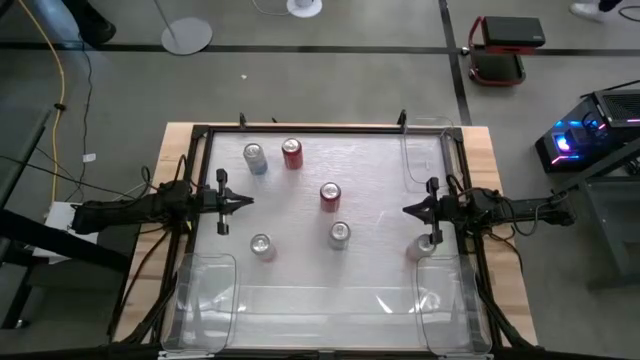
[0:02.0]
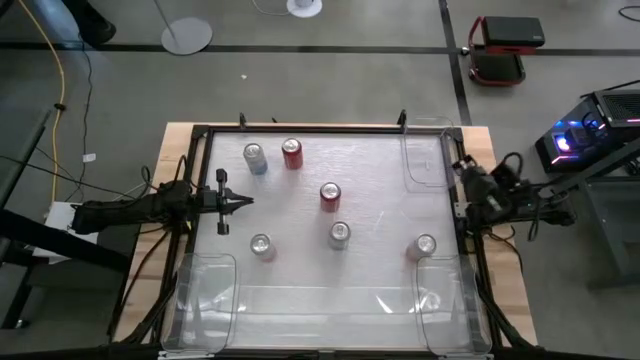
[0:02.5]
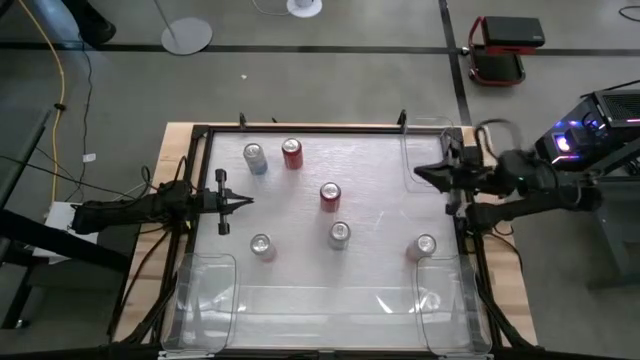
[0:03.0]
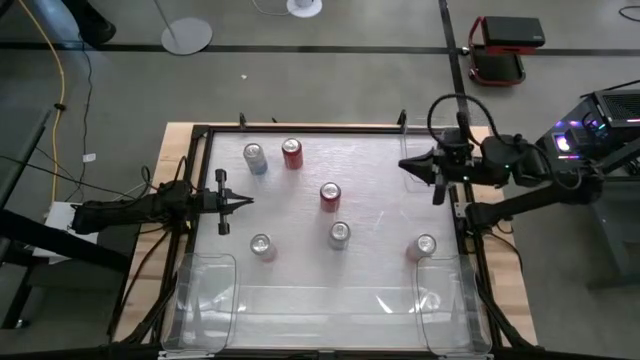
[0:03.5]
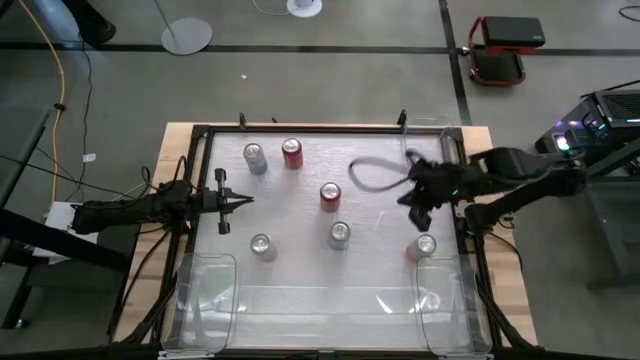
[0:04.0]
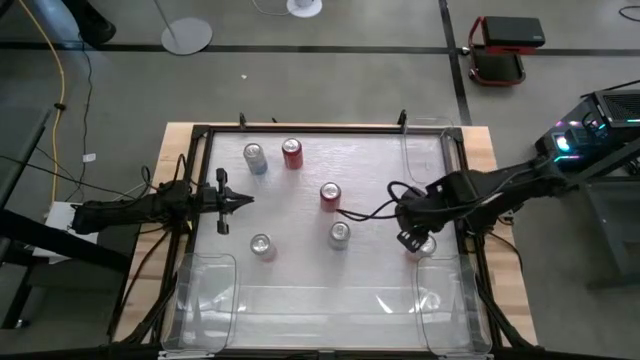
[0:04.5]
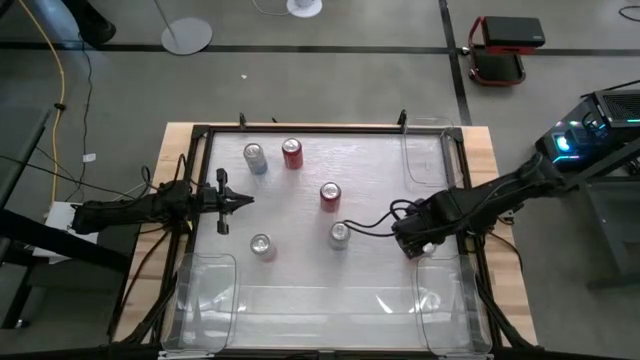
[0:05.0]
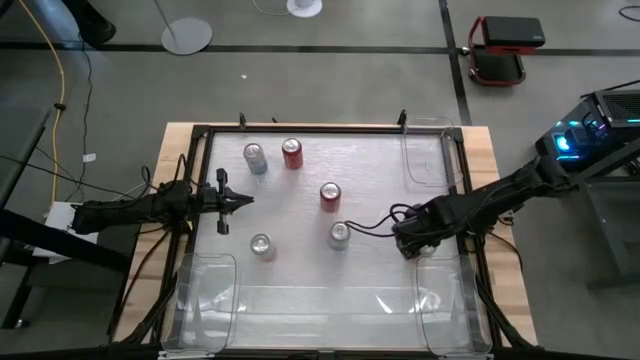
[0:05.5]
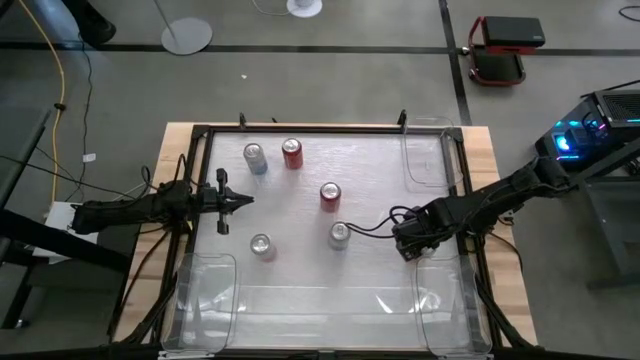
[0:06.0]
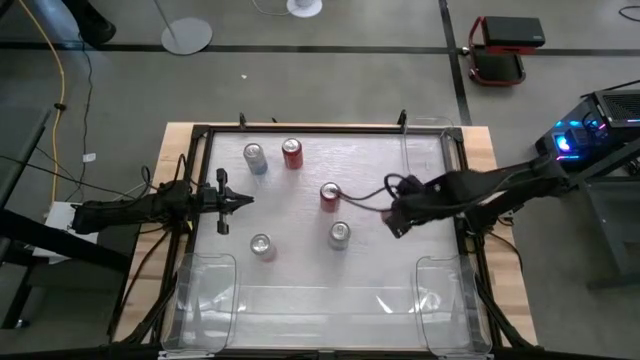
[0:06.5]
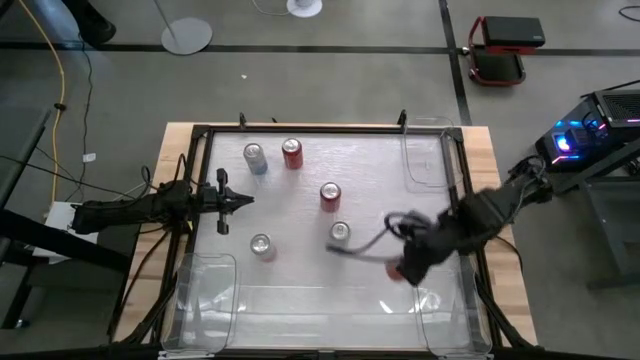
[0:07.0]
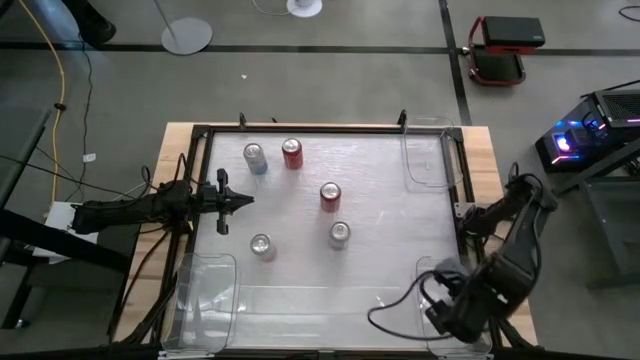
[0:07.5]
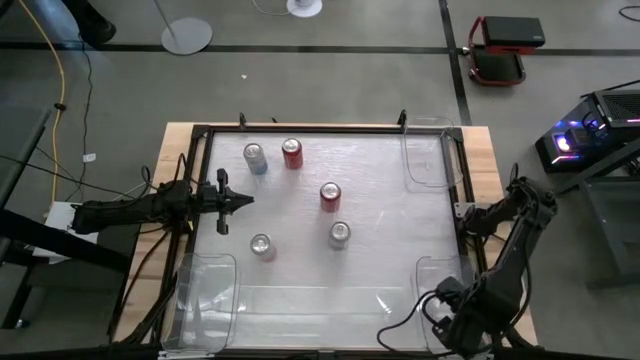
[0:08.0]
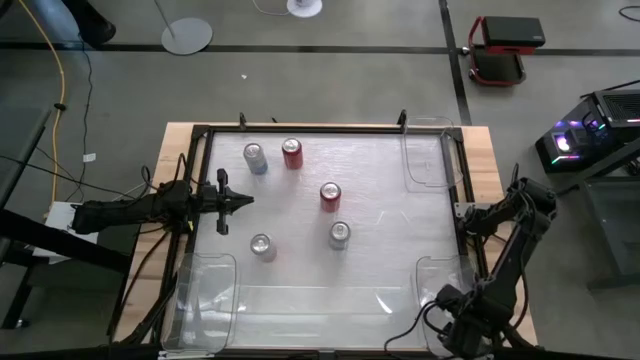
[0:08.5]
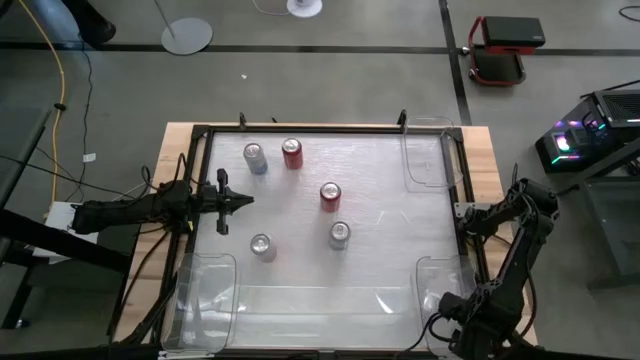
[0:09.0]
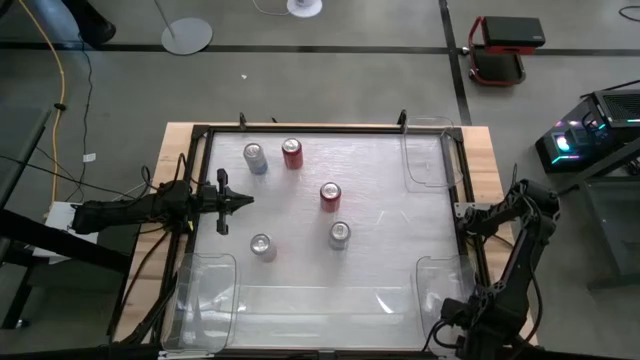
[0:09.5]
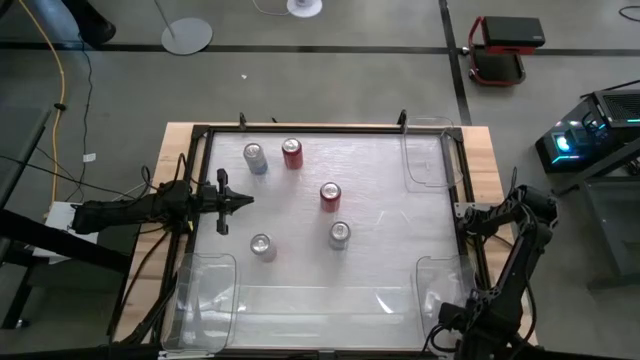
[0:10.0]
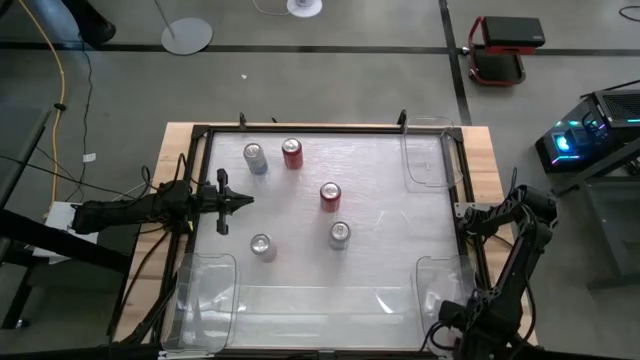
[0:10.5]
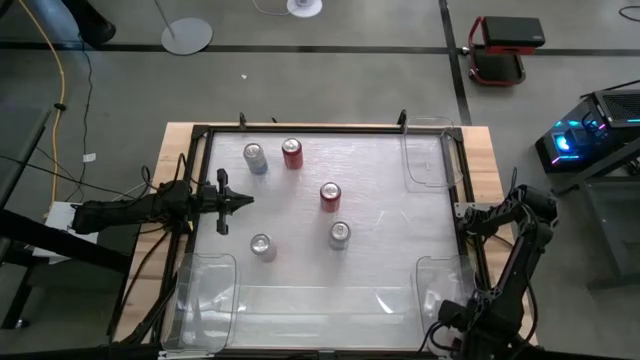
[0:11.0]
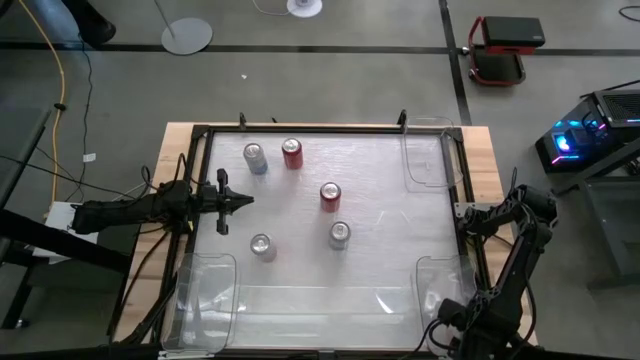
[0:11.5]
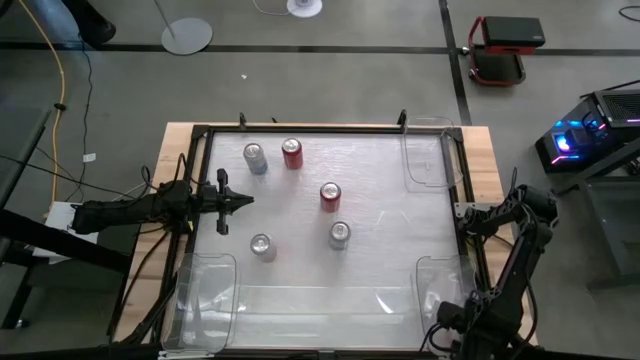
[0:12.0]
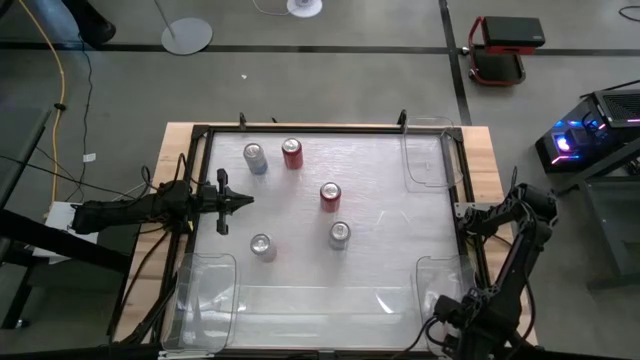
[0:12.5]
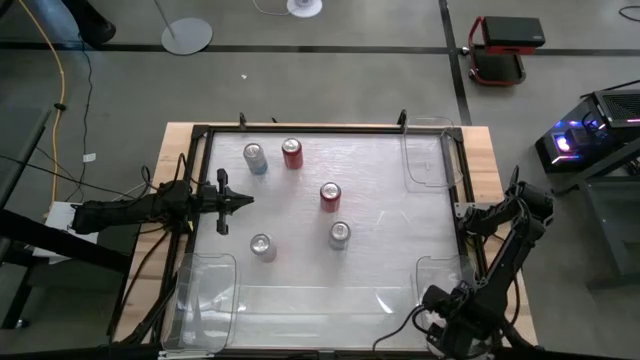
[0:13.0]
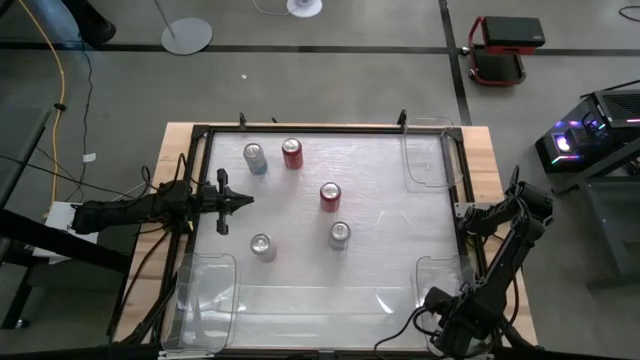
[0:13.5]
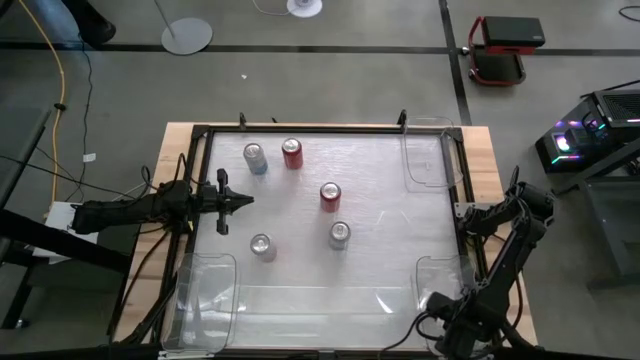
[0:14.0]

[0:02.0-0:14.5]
Task: Sort soda cans
Put the right orange-white soda can into the bottom right transparent bin

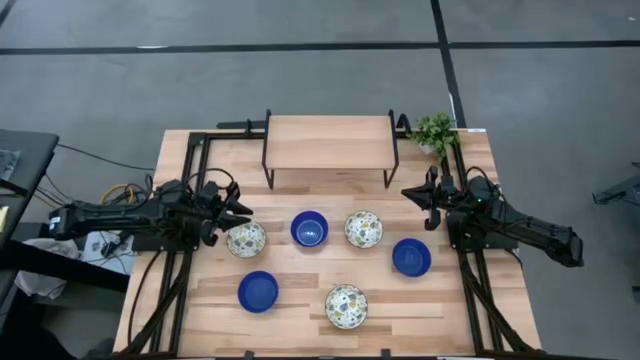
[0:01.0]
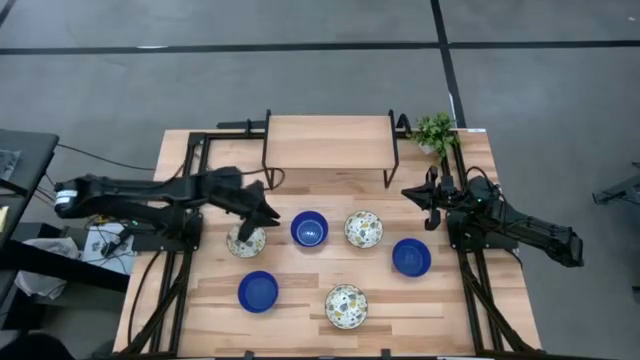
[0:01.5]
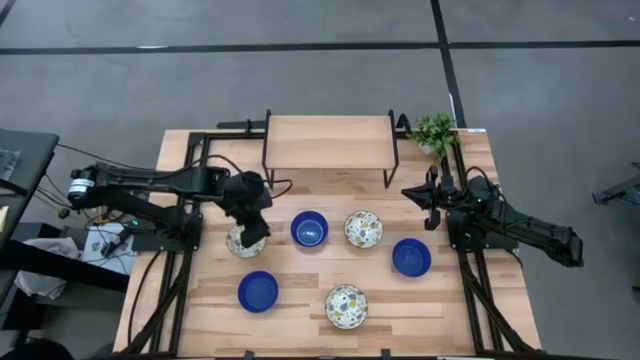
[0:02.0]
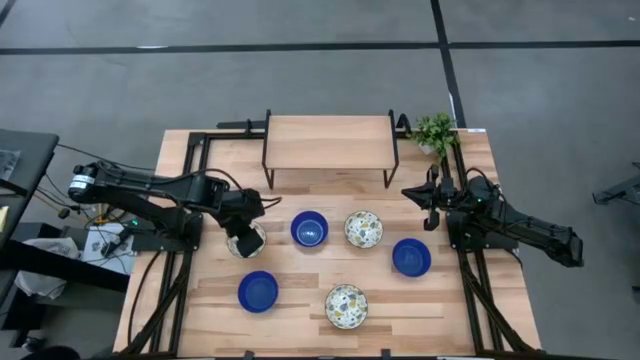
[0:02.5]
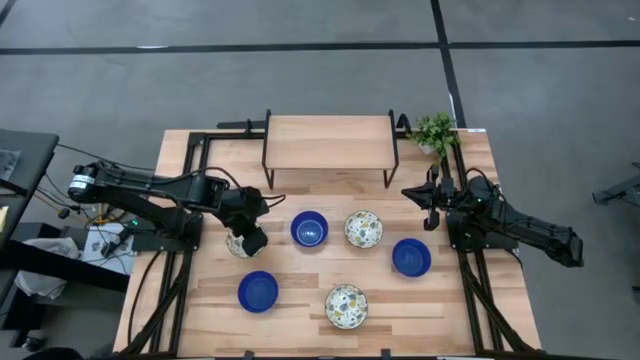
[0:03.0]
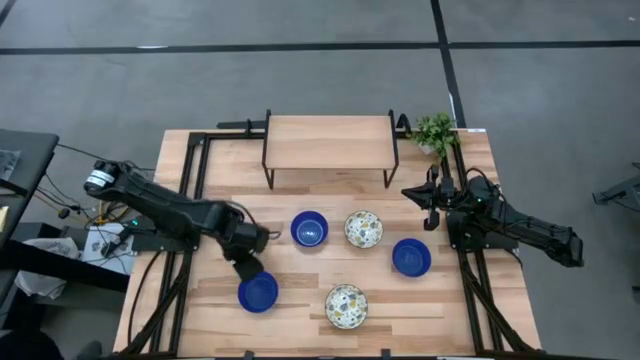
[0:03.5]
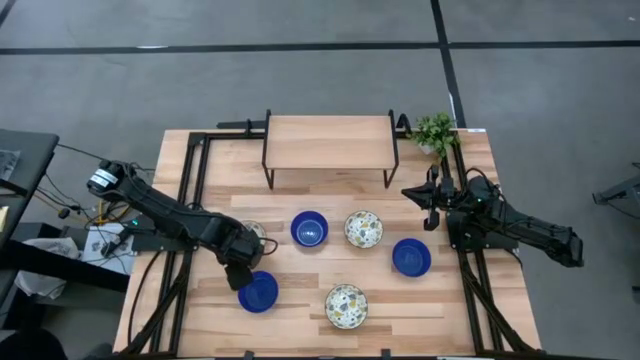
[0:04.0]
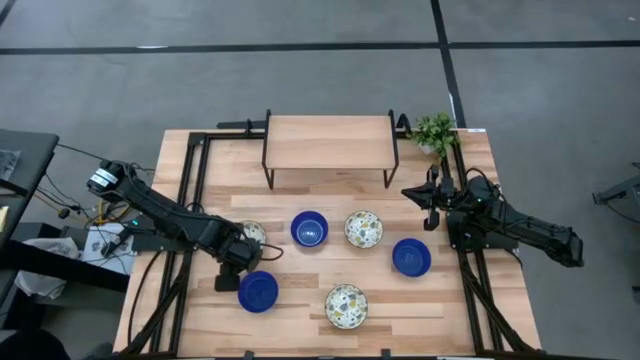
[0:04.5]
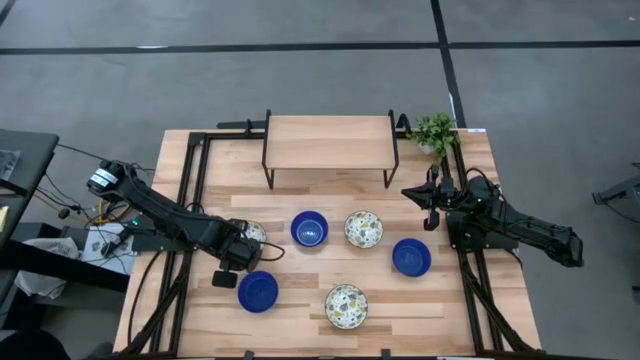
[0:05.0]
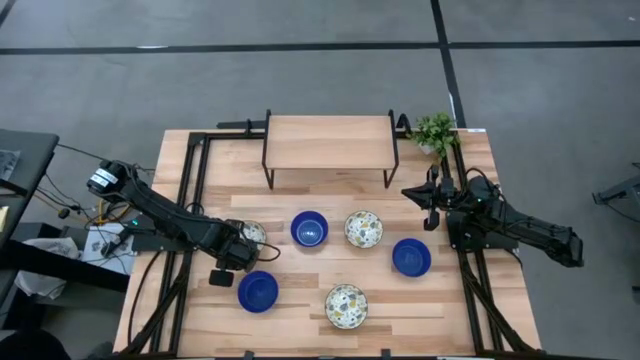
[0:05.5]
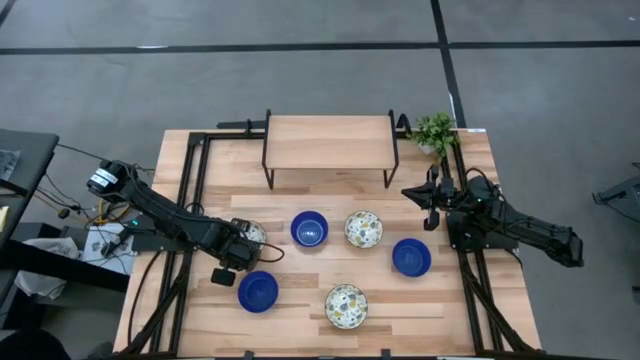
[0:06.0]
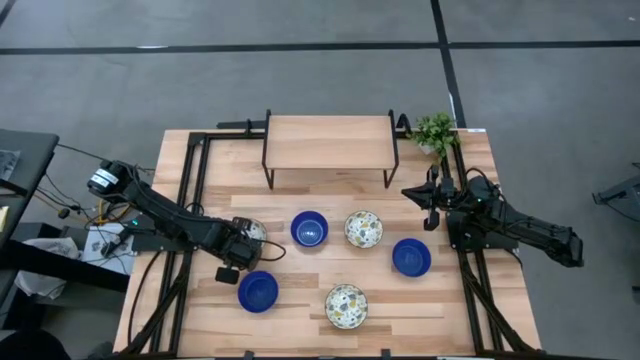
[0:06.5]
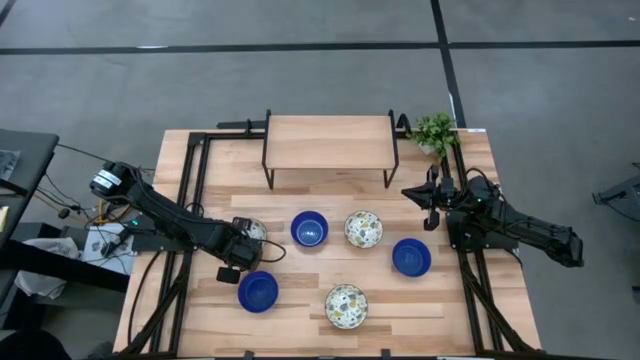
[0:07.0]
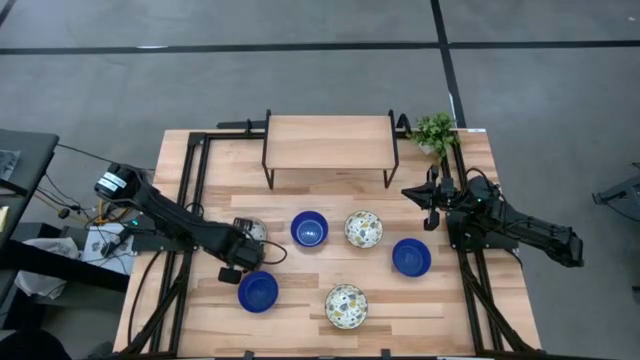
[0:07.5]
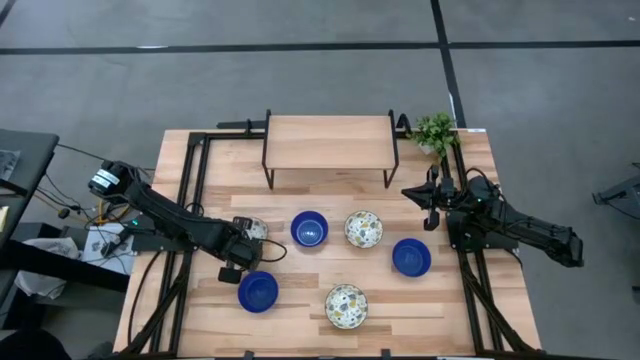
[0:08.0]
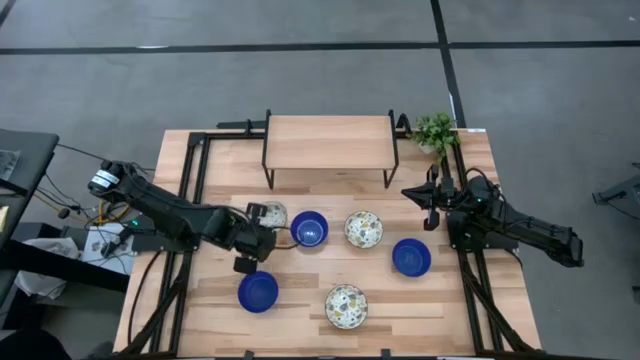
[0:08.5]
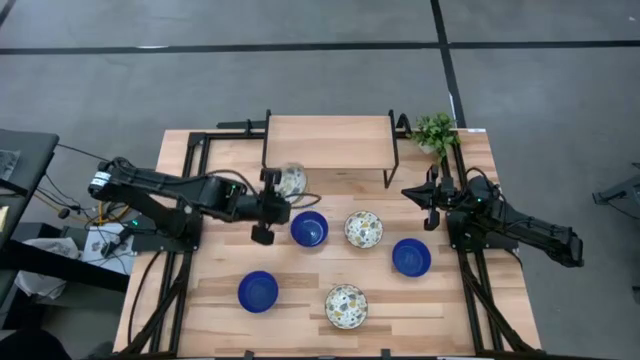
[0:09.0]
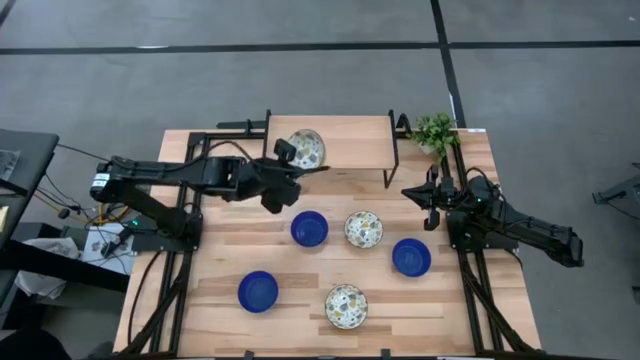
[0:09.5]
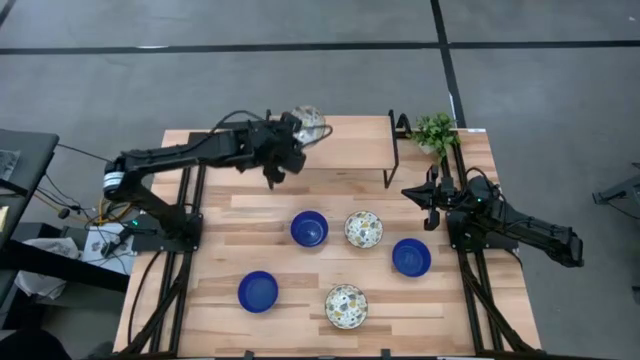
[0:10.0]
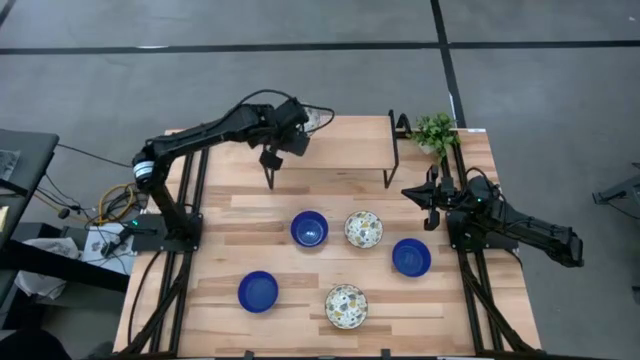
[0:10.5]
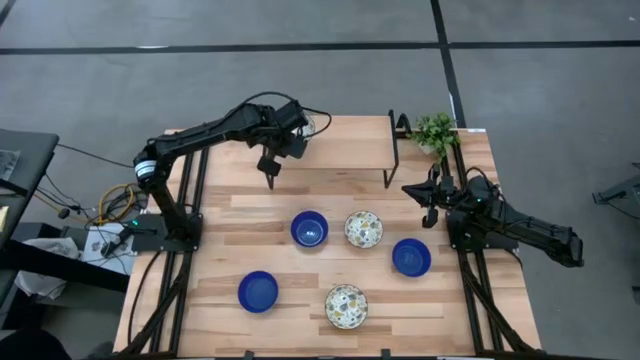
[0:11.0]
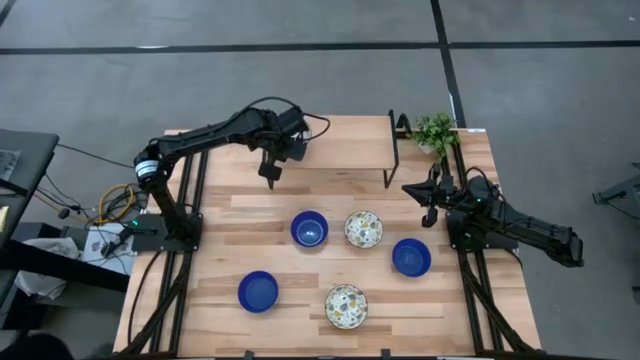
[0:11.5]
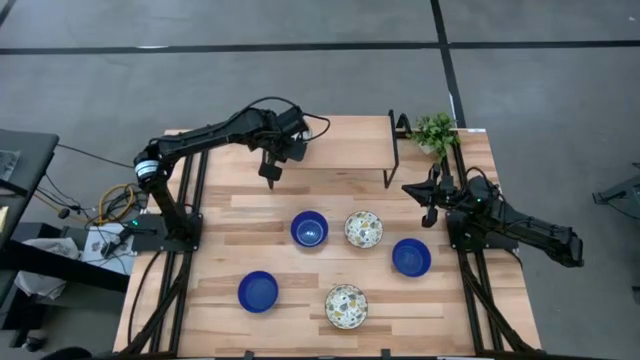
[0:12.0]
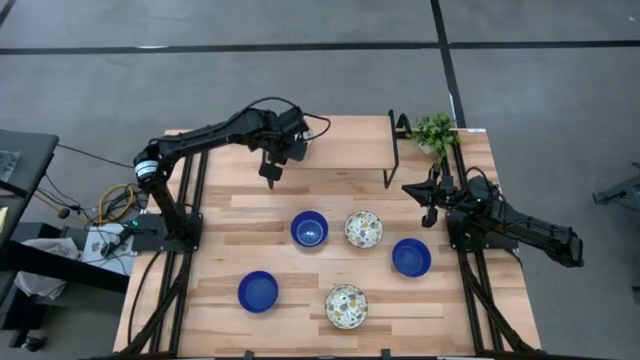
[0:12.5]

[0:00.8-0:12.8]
Task: Pick & Place Mini bowls
Put the top left patterned bowl on the shelf
